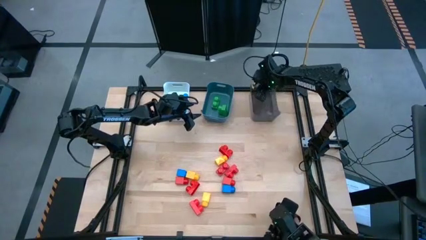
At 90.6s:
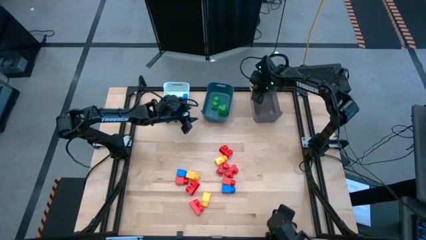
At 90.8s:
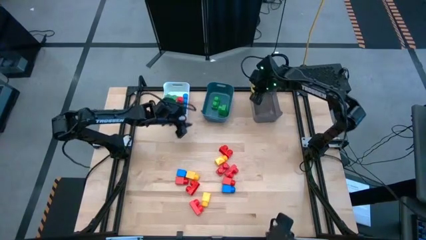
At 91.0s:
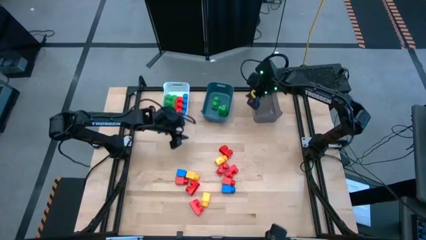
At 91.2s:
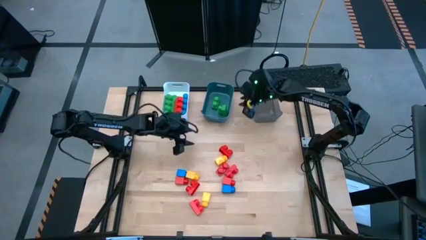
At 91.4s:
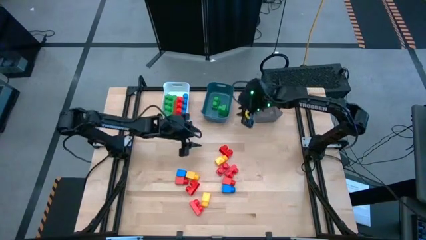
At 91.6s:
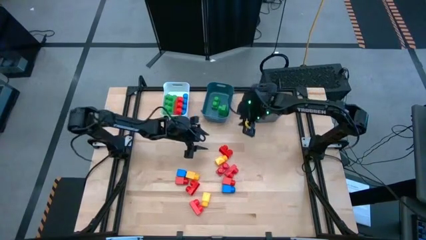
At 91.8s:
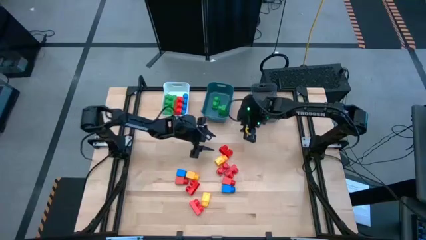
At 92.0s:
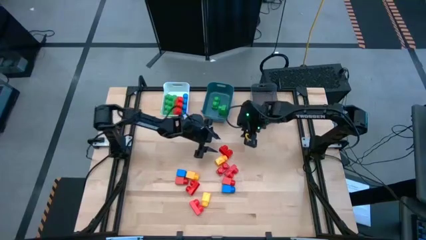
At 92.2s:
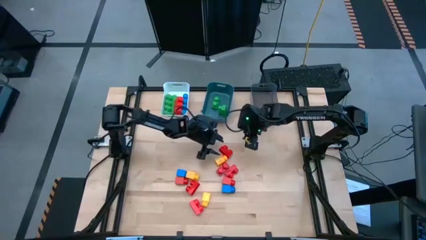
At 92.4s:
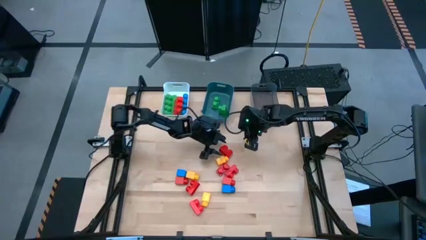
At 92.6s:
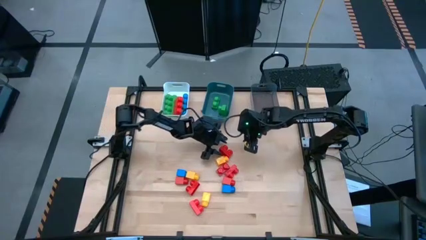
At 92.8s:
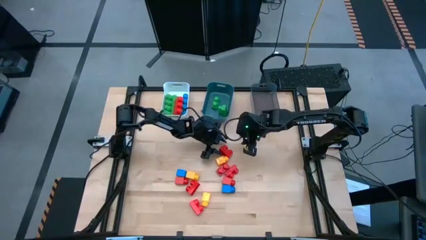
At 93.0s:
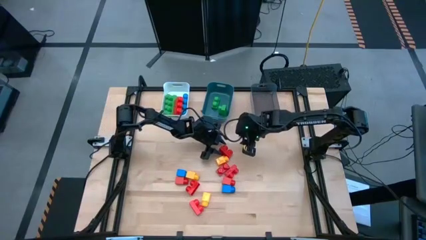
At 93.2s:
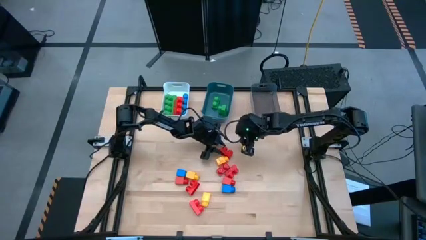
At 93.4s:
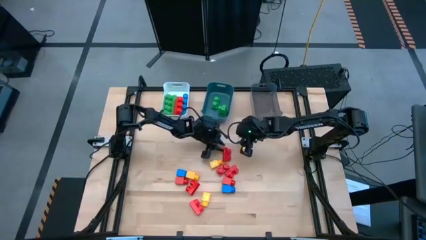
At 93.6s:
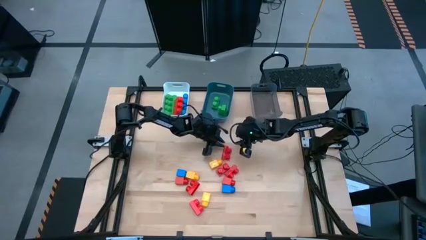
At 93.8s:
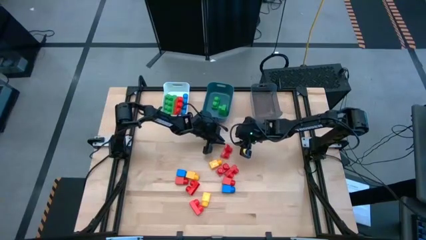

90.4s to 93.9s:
Task: Sort blocks by size
Put the 2 studs red game piece into the blue bin

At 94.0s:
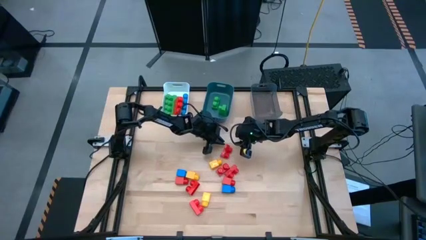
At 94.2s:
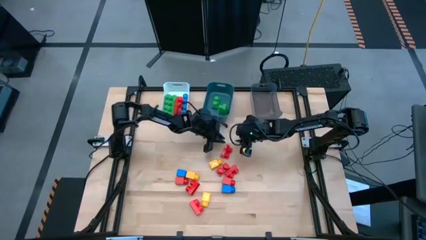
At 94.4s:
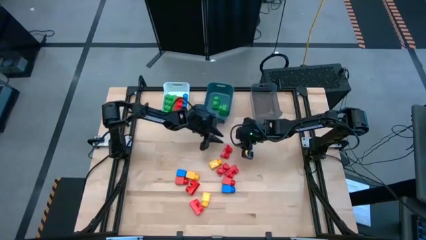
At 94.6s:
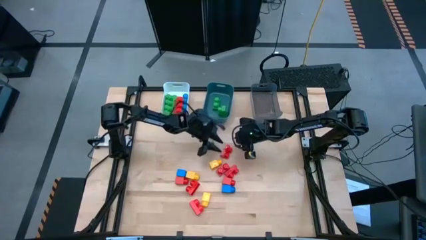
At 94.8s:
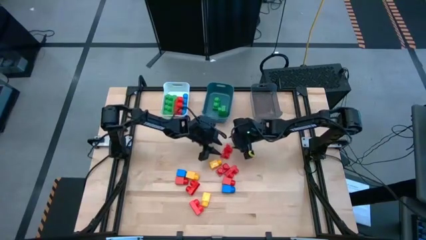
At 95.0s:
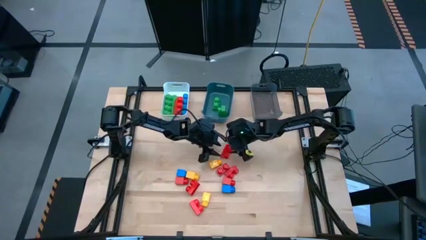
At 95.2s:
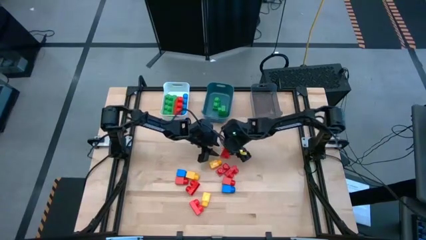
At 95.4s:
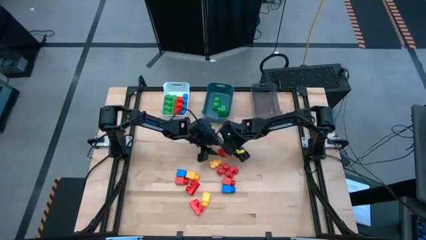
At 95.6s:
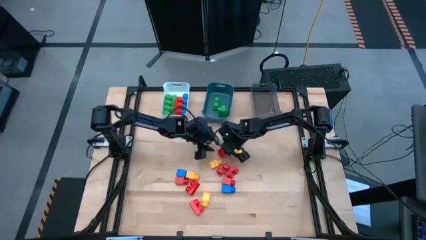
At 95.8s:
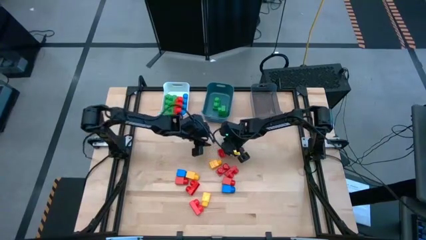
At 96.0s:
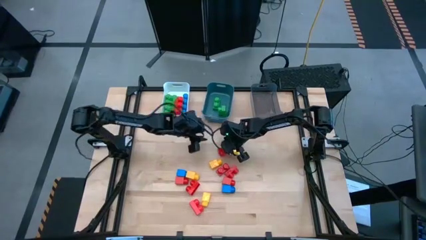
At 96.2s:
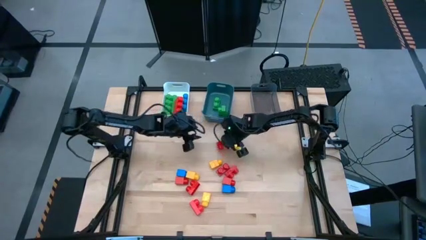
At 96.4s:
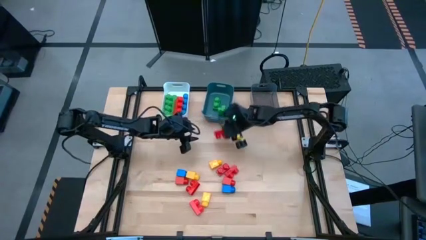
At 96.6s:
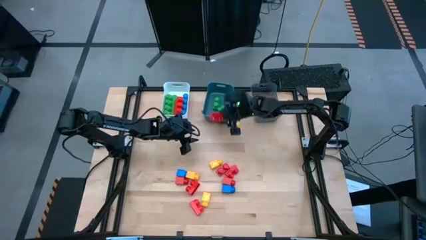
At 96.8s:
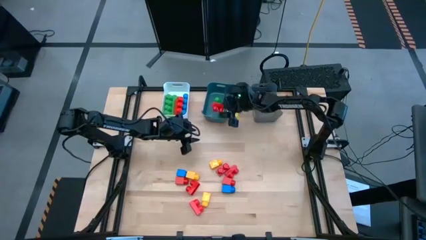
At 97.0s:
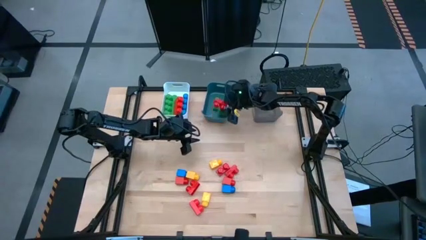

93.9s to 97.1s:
Put the 2 studs red game piece into the blue bin

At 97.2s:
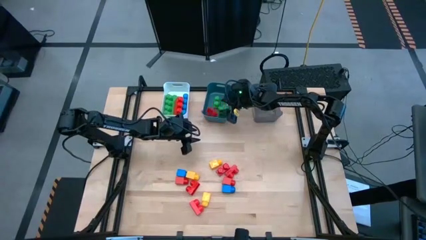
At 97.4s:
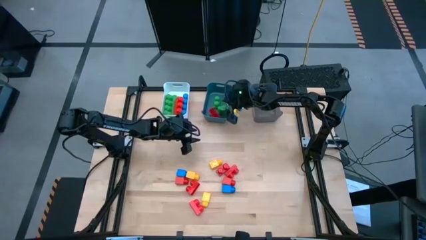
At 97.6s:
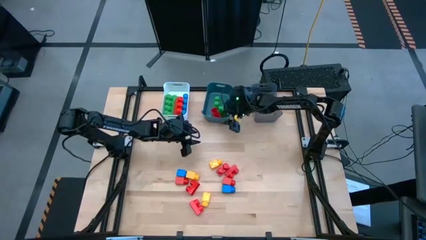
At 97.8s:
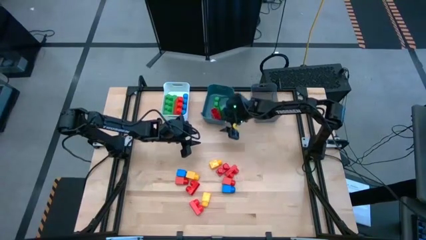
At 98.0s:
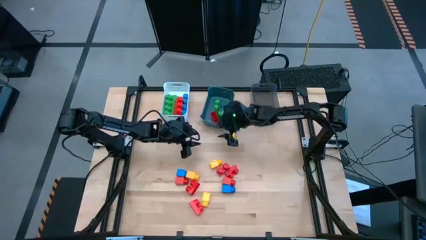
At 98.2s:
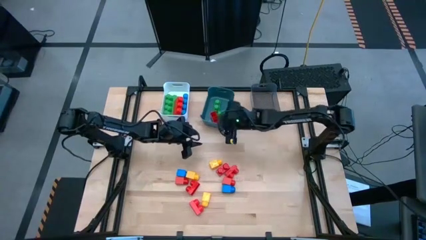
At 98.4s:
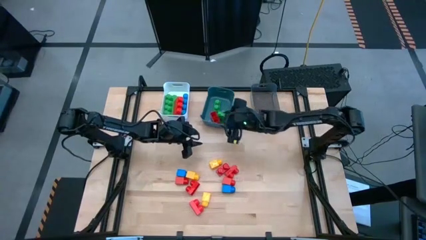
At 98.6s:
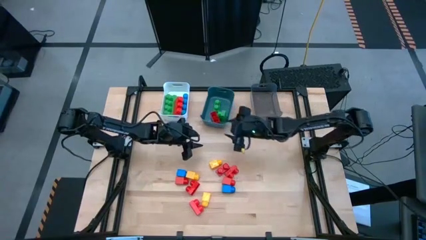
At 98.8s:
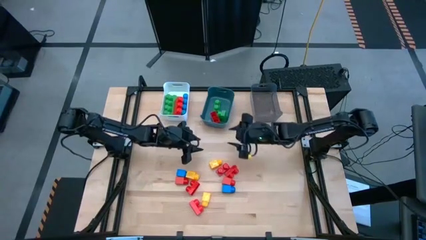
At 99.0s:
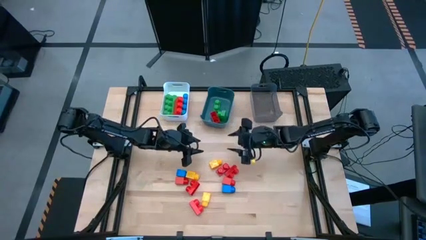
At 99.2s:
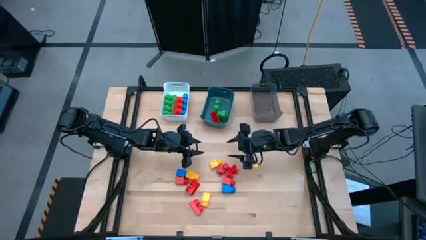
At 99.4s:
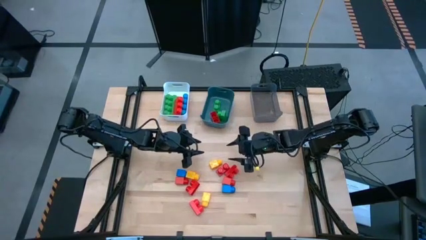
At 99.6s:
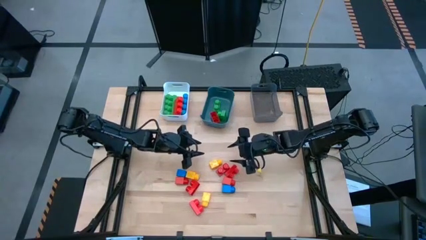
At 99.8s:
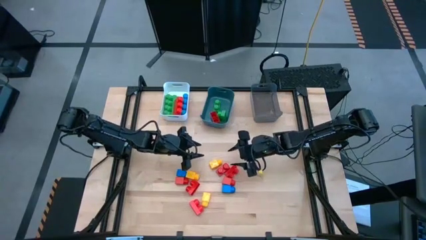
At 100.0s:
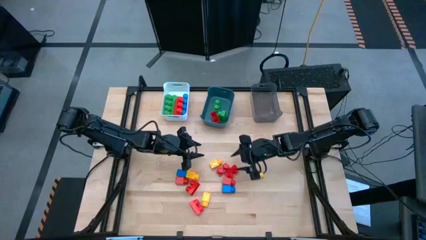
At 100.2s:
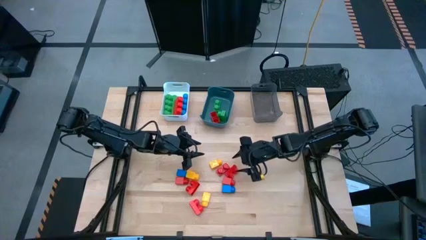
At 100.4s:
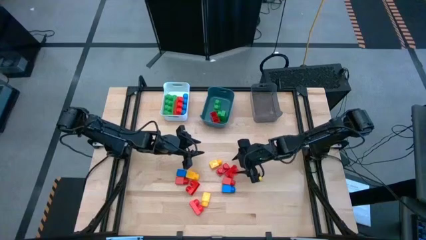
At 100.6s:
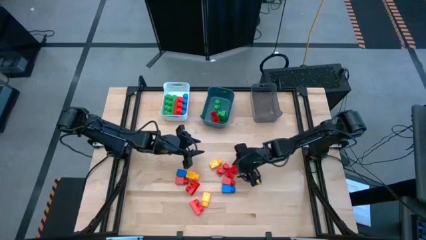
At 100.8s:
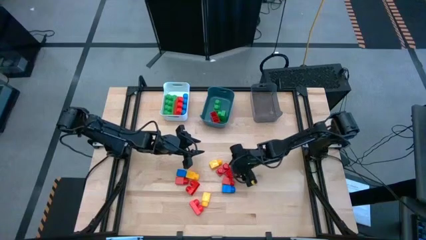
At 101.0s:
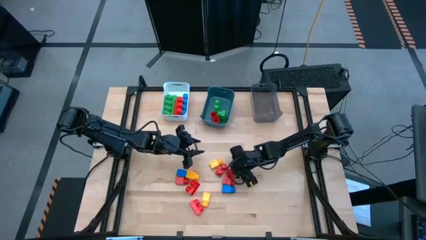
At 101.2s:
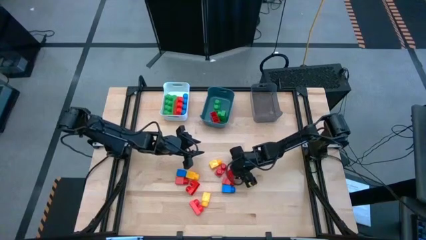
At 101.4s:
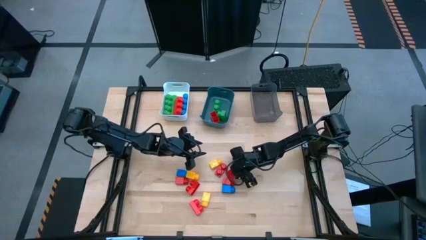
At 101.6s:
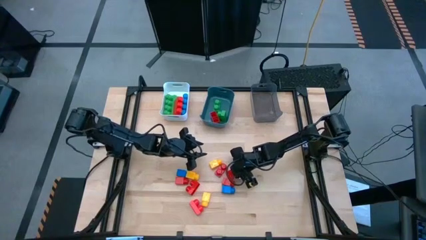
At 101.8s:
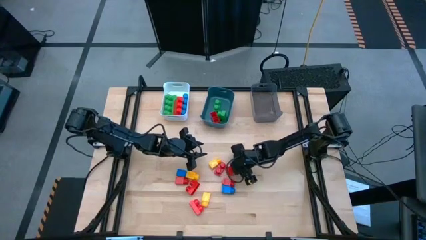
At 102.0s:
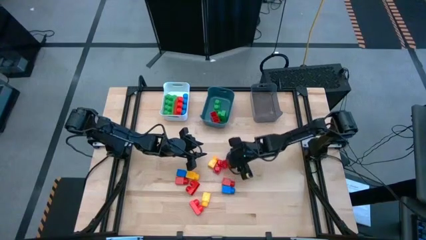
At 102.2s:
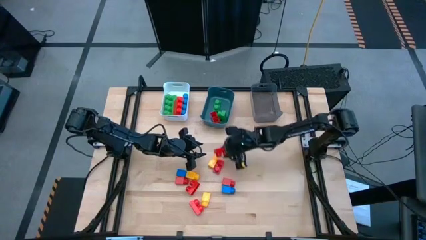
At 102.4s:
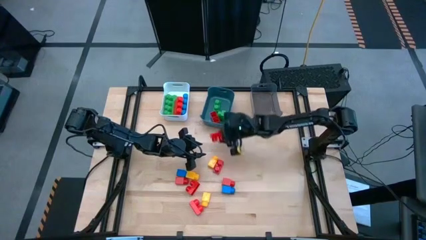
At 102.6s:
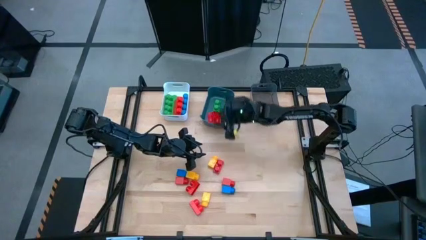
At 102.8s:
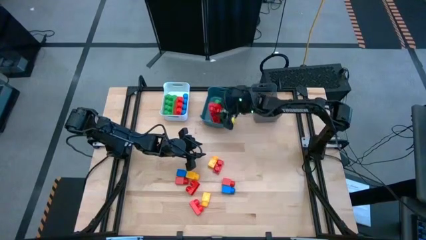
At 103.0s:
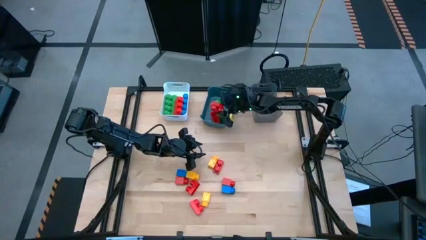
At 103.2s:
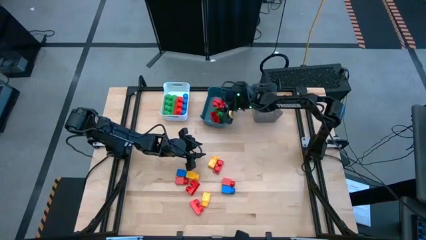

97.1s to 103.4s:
Put the 2 studs red game piece into the blue bin

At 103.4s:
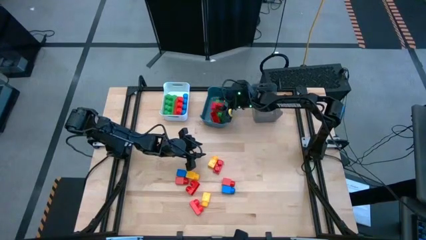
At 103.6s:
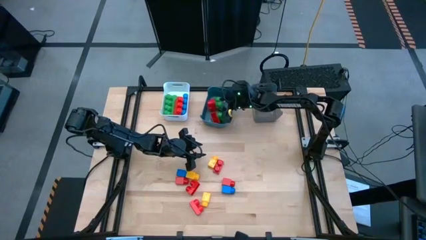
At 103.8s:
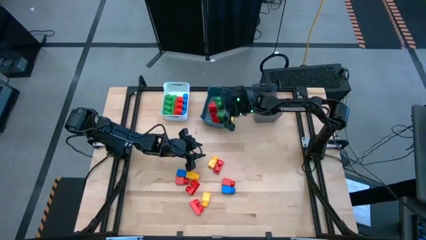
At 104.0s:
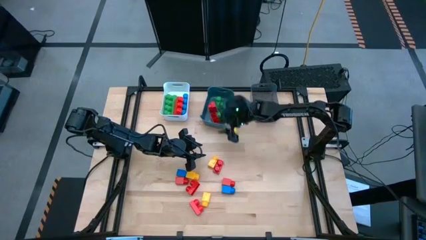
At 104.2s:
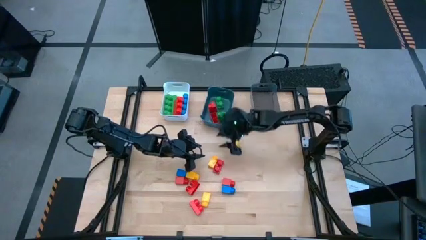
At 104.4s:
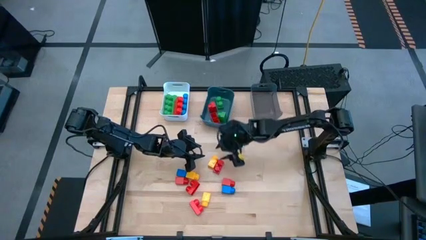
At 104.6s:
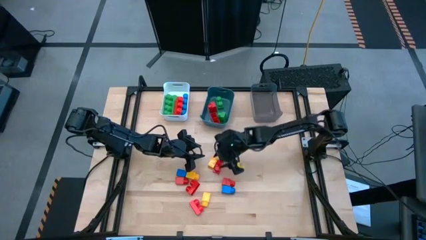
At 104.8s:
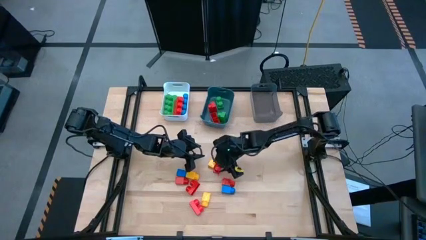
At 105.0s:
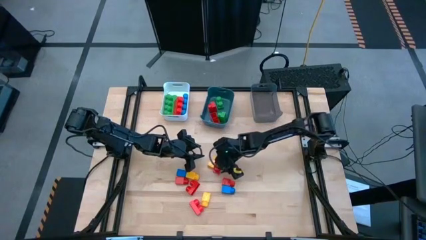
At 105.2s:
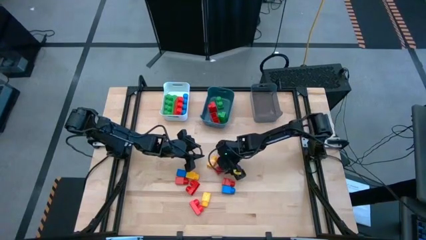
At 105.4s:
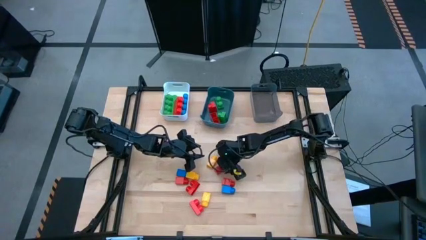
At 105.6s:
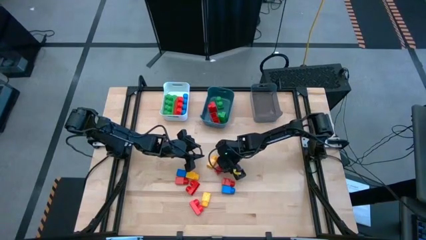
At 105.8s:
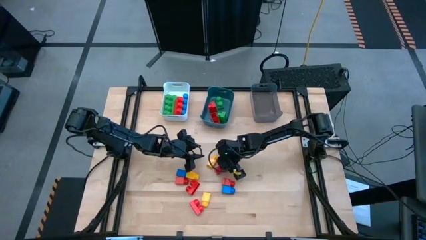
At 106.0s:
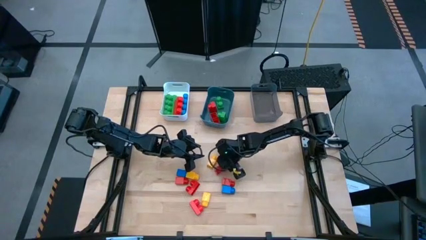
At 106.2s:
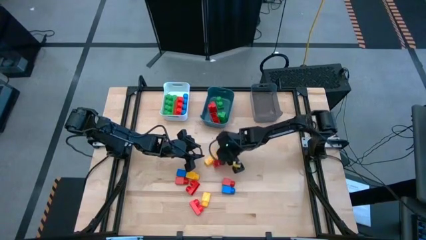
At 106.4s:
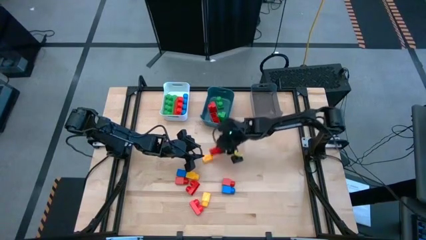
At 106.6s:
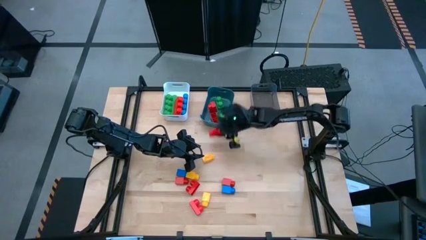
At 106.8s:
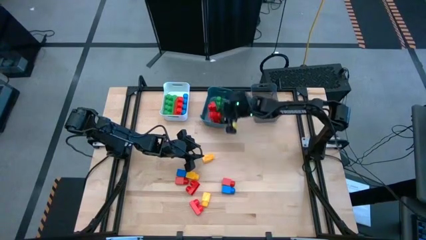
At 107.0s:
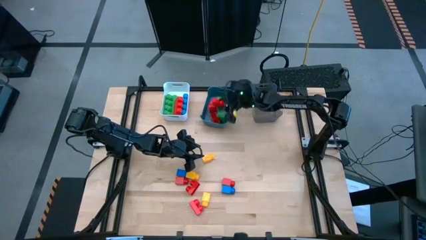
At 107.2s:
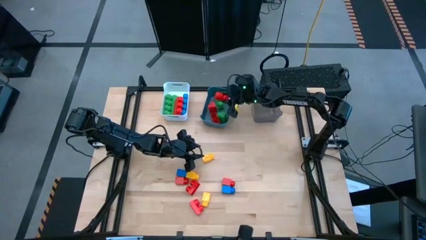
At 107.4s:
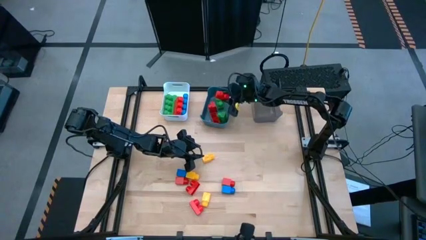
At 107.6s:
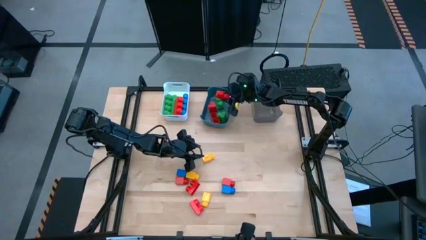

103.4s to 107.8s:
Put the 2 studs red game piece into the blue bin
